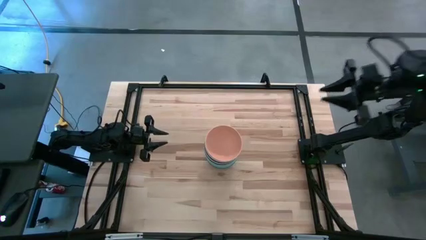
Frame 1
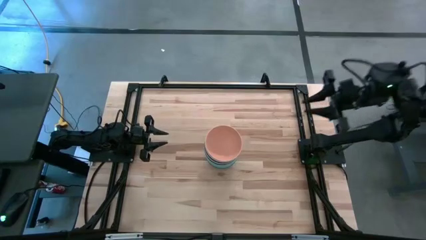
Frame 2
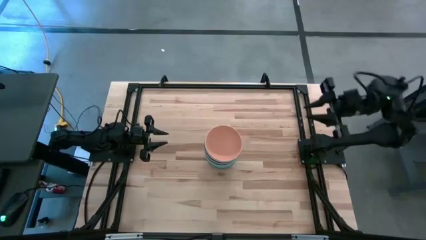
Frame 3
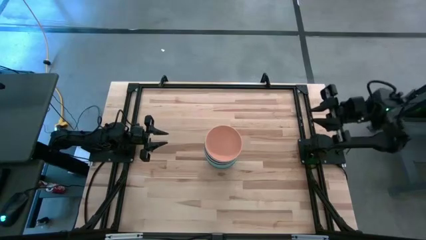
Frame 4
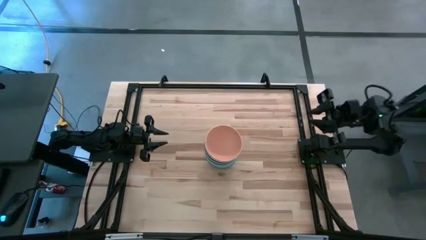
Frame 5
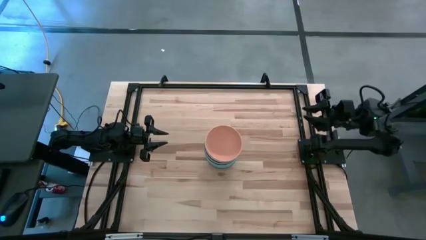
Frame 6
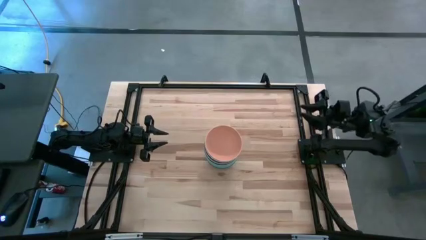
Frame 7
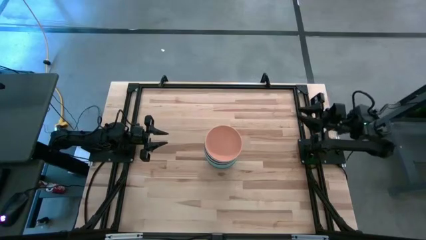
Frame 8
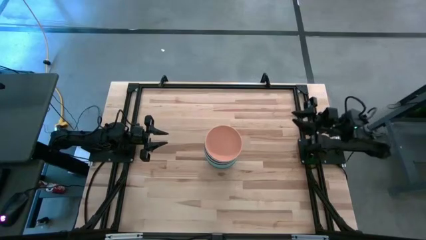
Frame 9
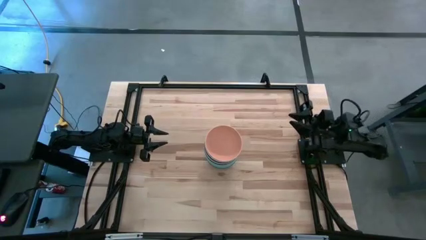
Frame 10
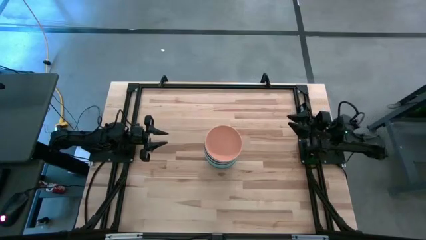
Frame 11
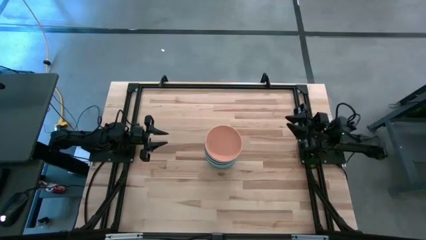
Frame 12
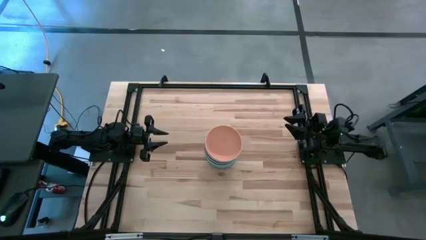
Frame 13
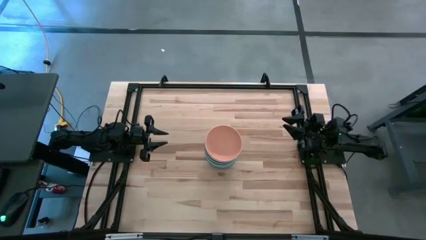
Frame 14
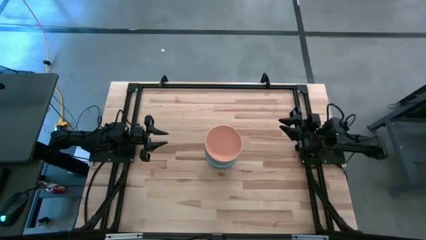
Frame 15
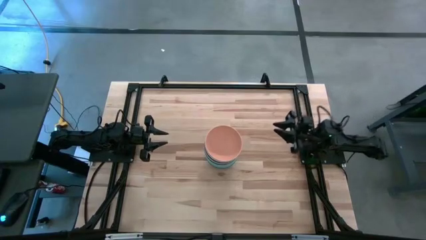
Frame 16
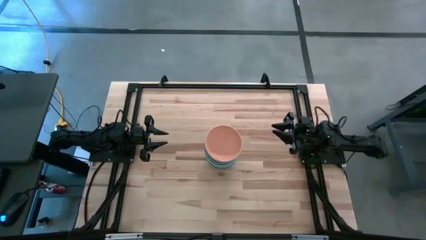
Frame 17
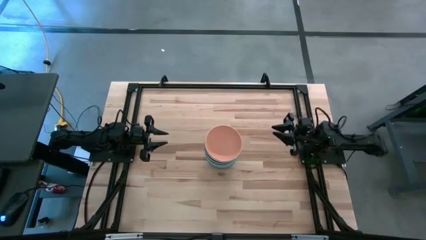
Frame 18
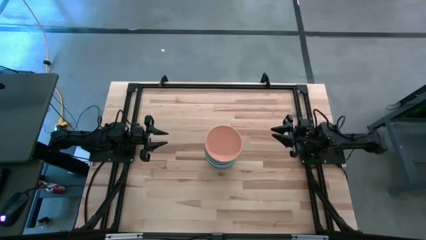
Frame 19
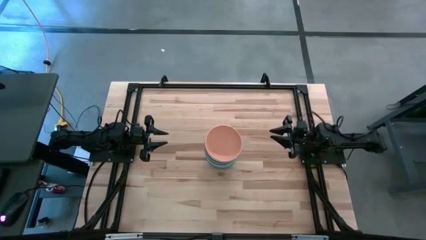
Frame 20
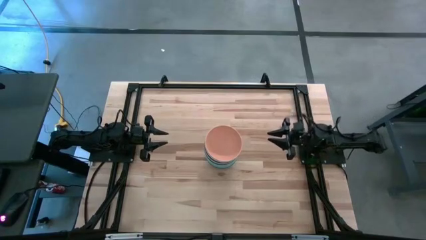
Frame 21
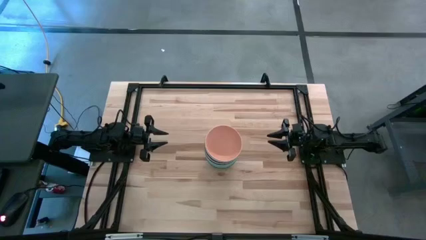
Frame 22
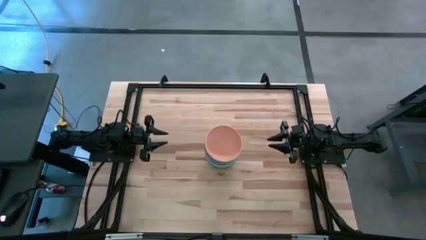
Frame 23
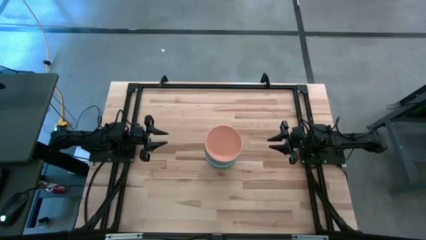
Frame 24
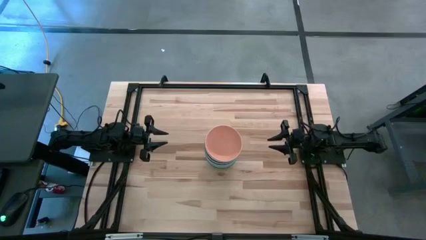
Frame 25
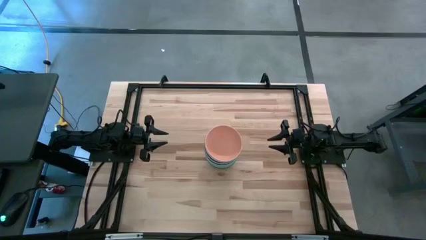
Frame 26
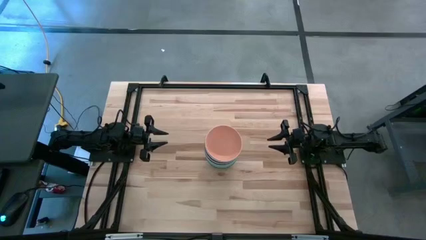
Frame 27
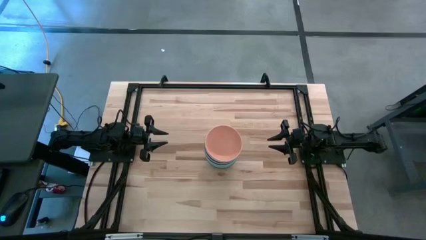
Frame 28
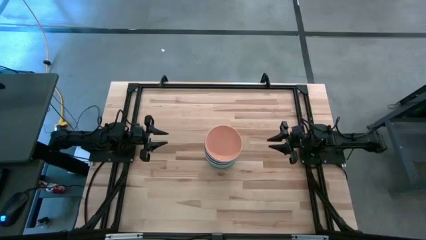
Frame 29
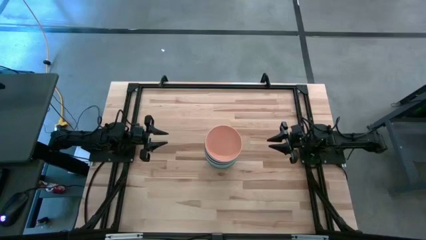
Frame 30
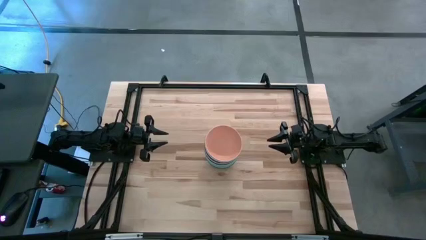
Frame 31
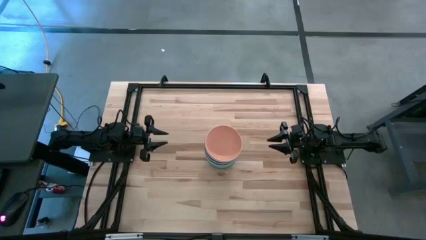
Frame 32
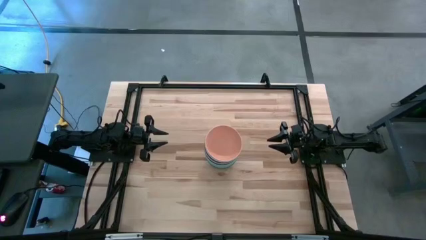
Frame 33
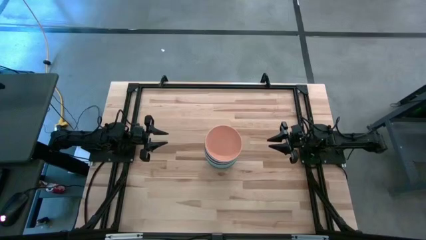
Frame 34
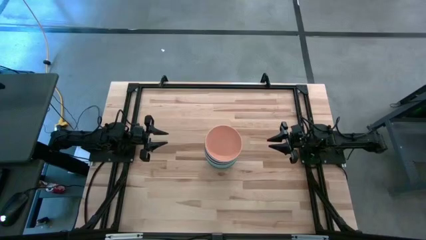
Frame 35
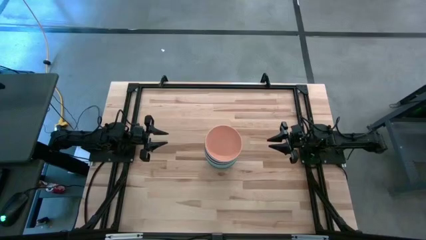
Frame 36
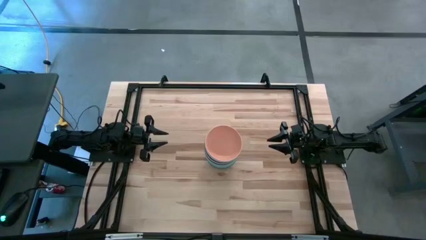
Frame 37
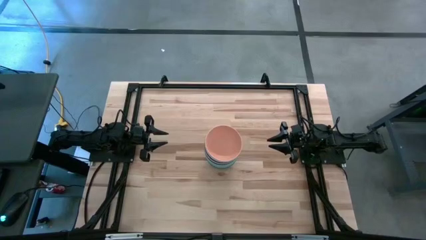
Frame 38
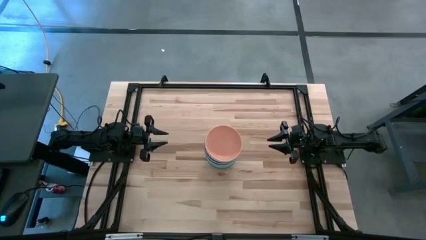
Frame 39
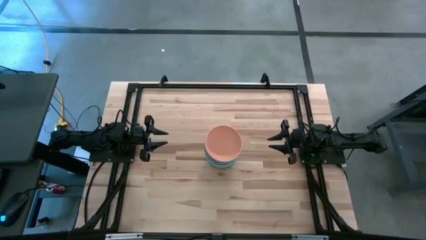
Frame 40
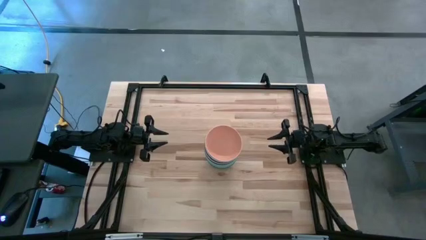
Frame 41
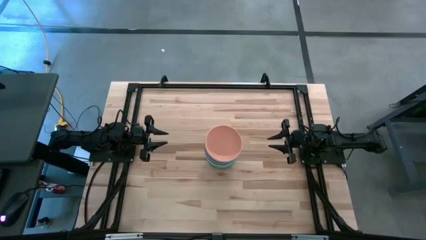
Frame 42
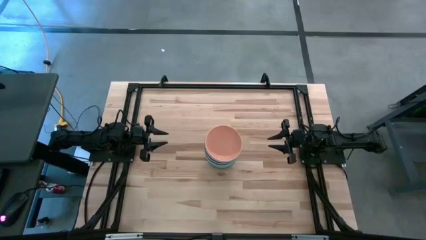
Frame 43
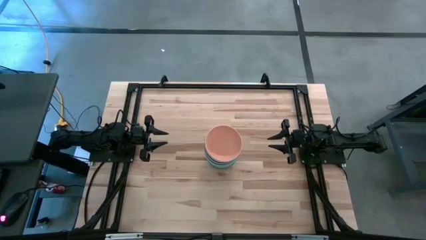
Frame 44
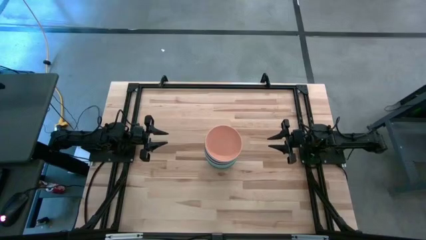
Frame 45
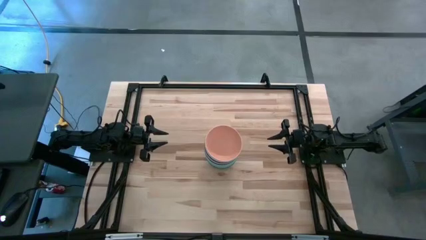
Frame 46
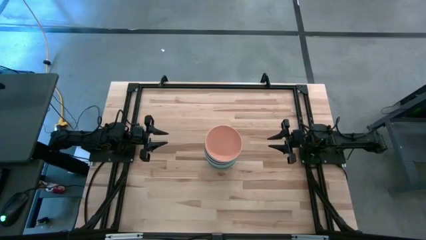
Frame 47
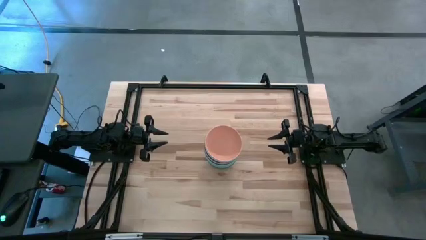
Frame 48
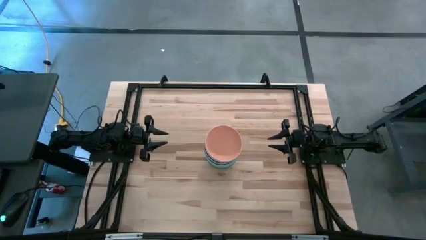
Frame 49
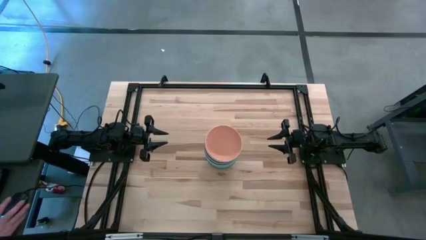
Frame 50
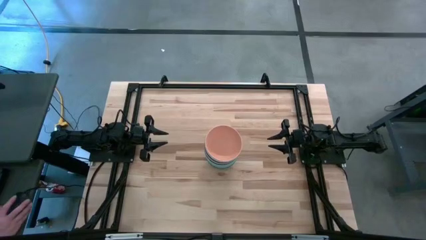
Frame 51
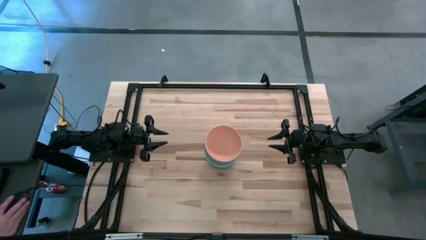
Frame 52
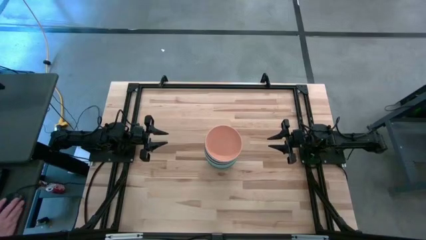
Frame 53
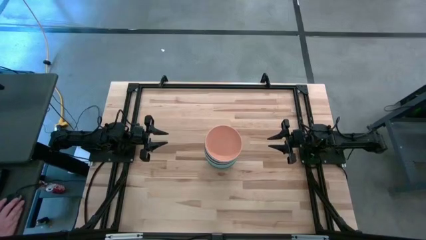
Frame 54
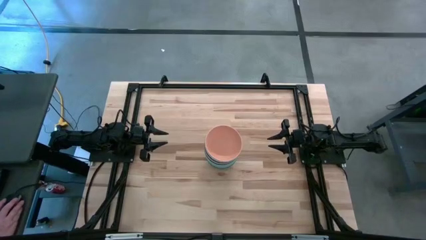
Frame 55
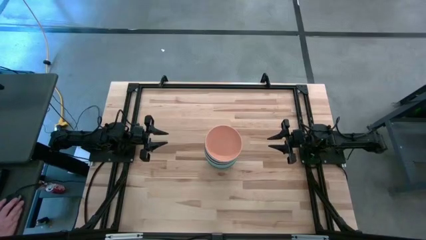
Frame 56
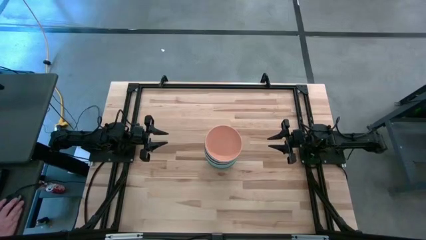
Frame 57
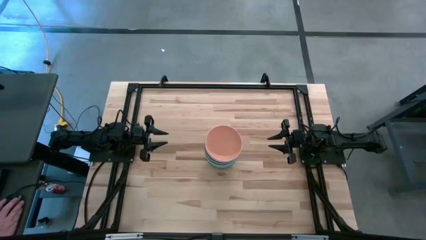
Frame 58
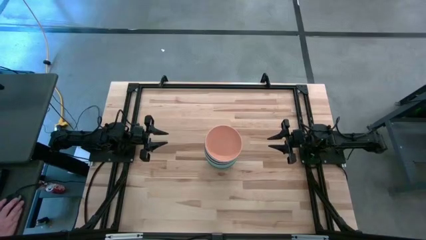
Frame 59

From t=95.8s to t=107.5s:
Task: Nest bowls inside each other
Return to Home Position

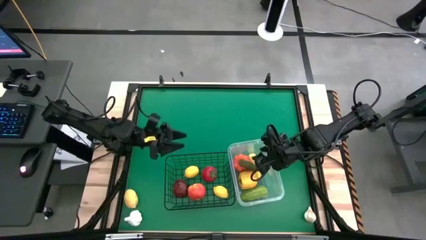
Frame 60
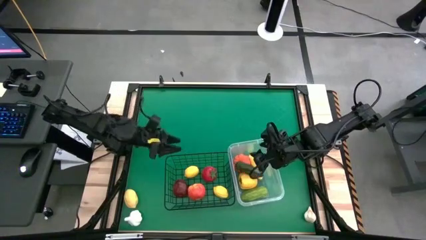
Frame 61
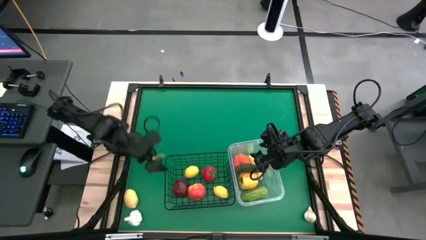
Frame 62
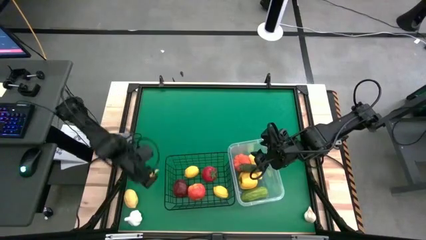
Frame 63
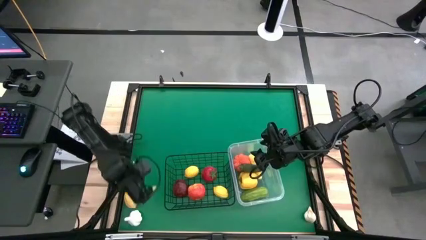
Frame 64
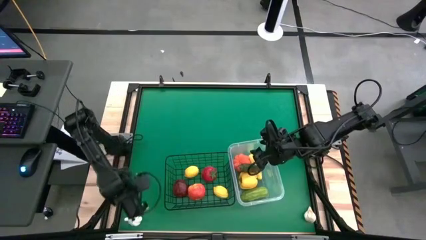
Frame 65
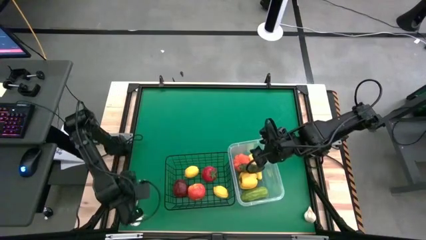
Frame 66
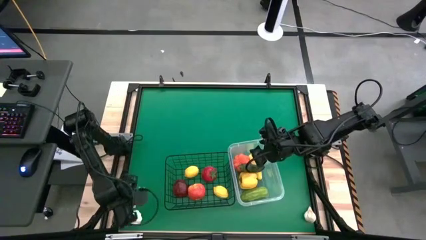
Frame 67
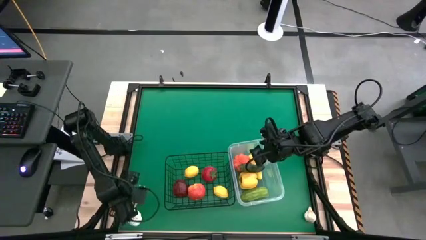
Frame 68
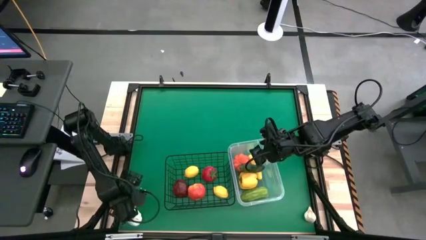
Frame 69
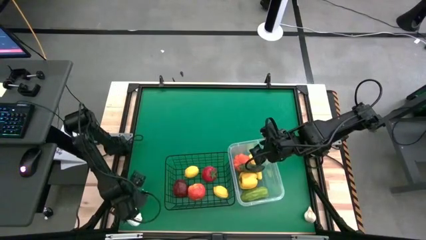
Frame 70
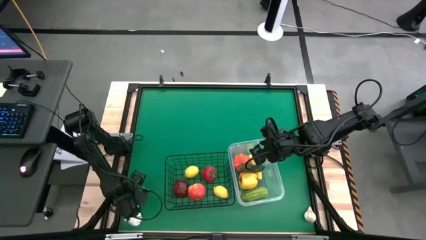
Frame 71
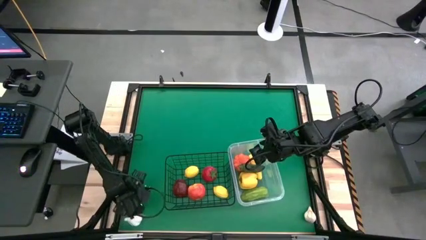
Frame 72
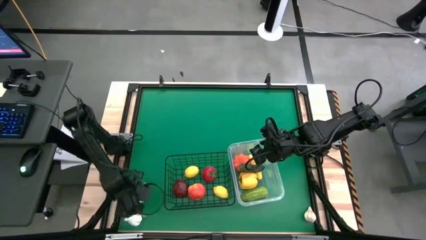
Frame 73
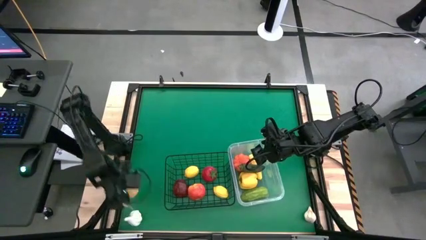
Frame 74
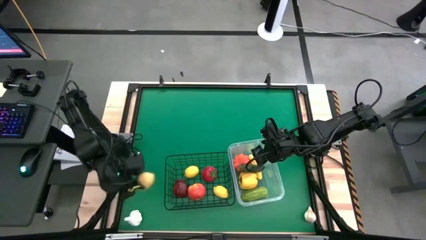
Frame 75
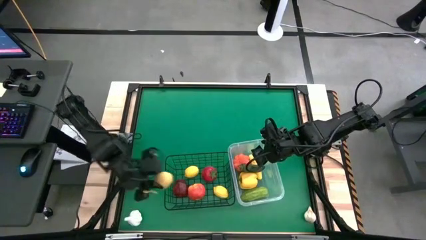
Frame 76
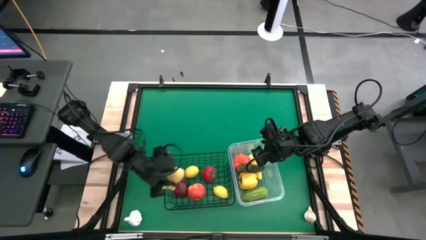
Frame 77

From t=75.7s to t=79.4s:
Task: Sort produce into baskets
Put the lemon into the wire basket
